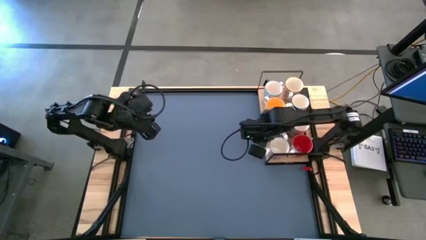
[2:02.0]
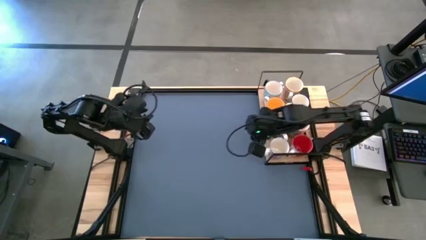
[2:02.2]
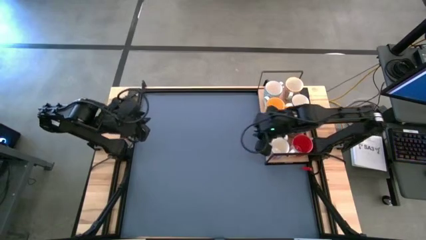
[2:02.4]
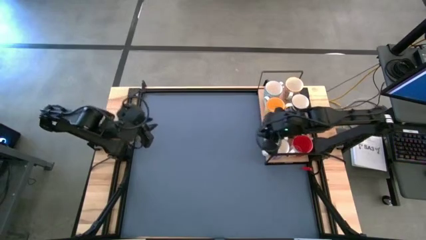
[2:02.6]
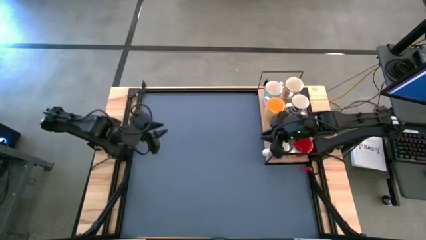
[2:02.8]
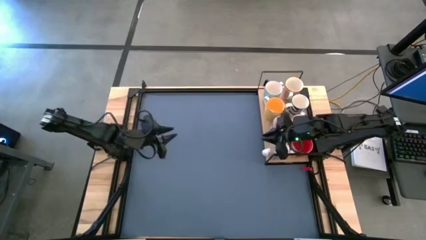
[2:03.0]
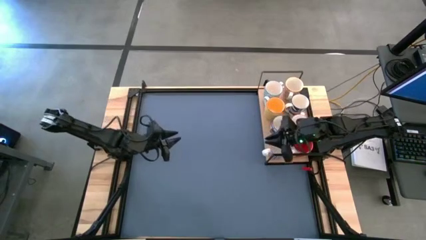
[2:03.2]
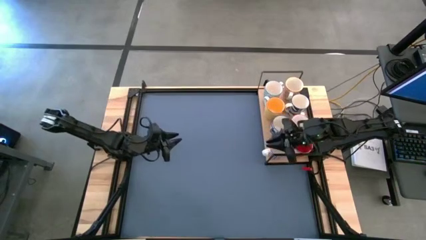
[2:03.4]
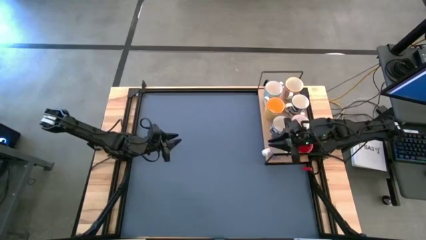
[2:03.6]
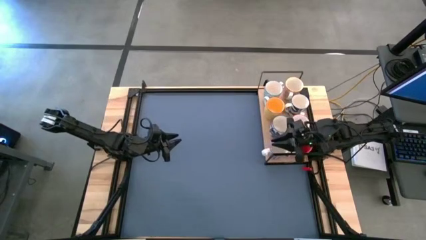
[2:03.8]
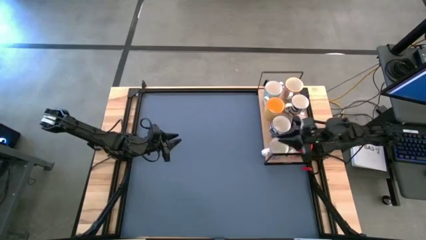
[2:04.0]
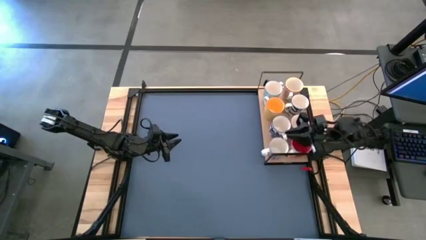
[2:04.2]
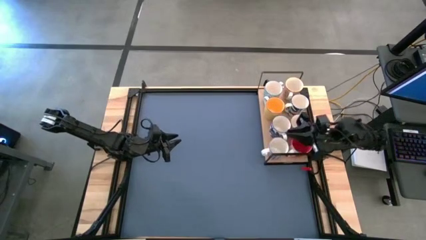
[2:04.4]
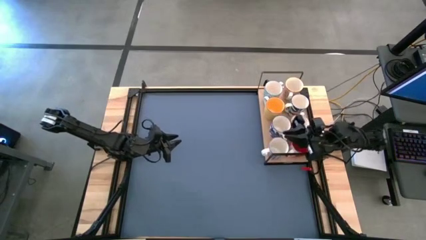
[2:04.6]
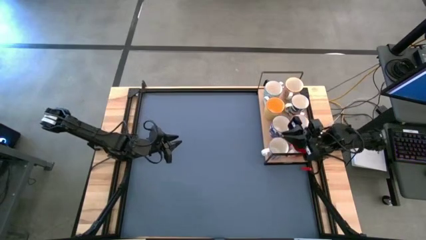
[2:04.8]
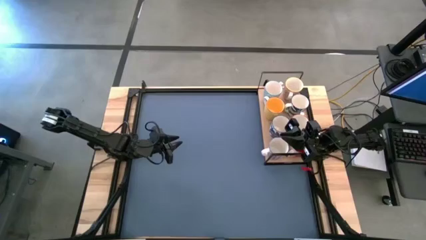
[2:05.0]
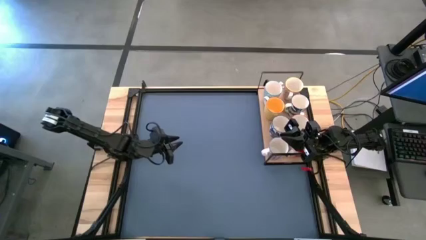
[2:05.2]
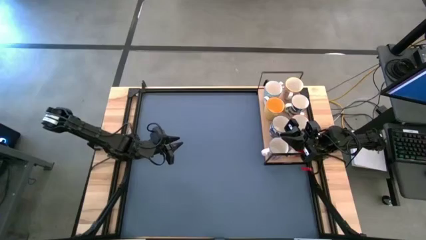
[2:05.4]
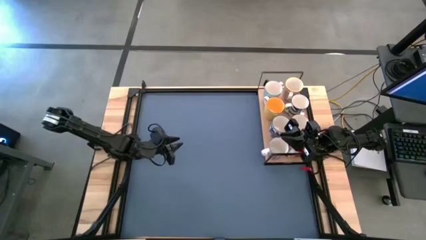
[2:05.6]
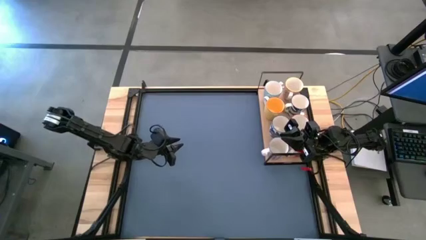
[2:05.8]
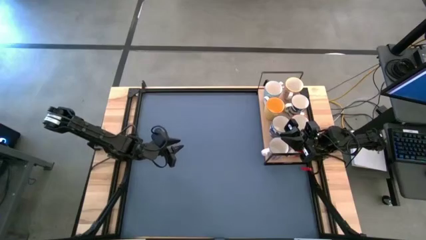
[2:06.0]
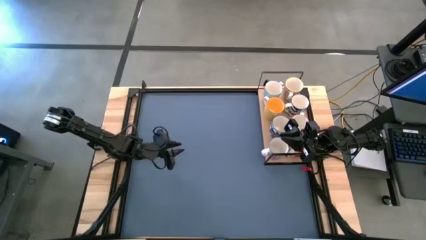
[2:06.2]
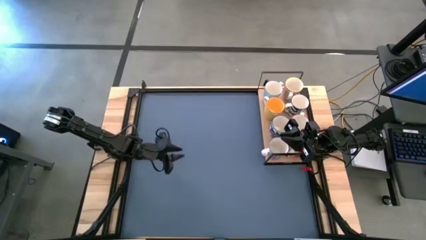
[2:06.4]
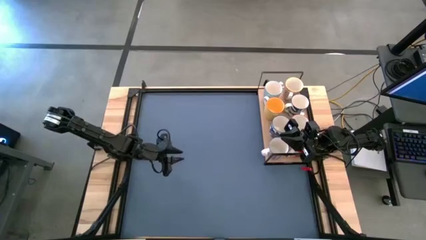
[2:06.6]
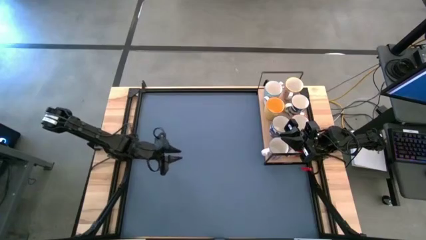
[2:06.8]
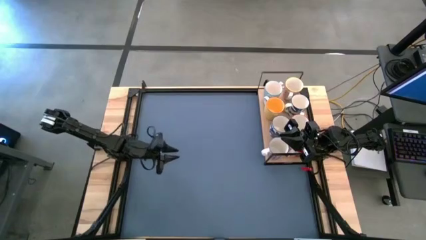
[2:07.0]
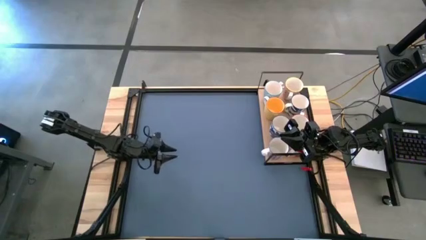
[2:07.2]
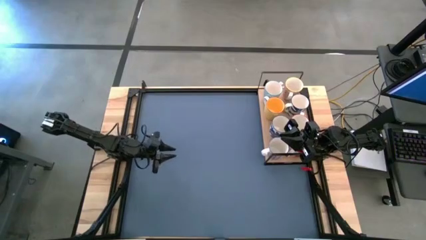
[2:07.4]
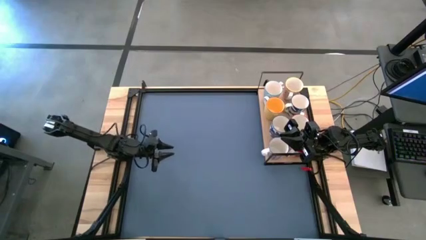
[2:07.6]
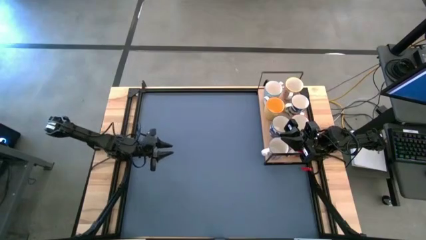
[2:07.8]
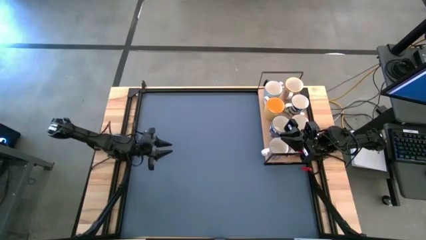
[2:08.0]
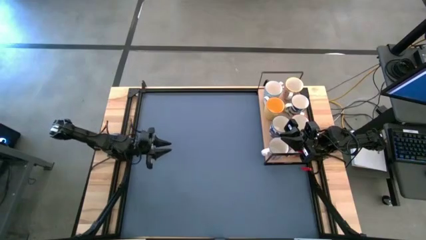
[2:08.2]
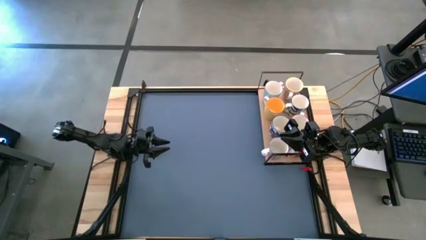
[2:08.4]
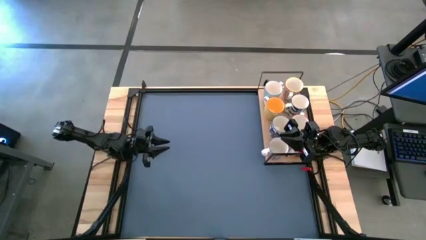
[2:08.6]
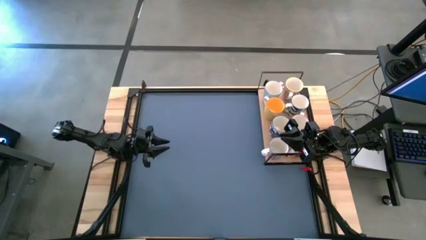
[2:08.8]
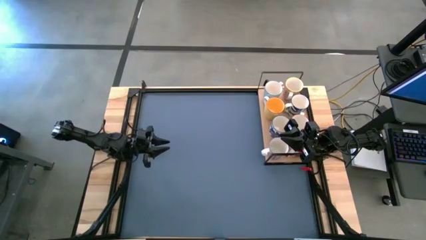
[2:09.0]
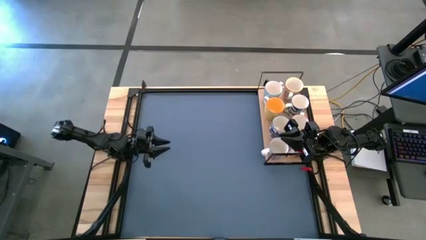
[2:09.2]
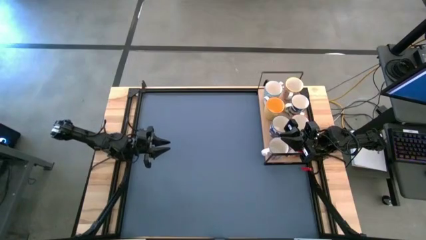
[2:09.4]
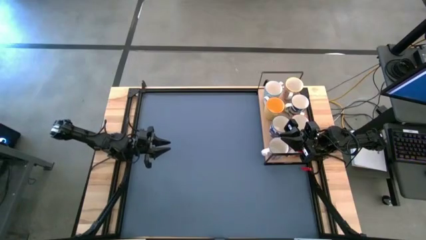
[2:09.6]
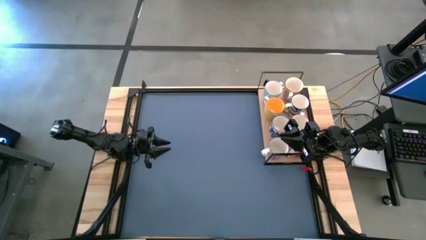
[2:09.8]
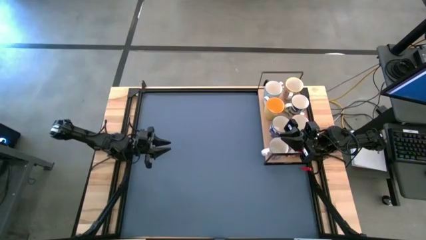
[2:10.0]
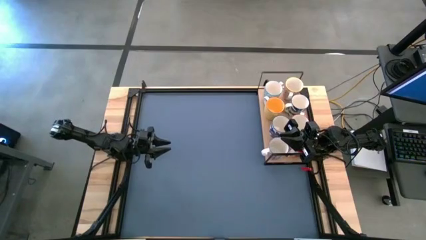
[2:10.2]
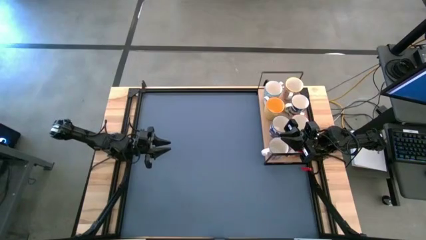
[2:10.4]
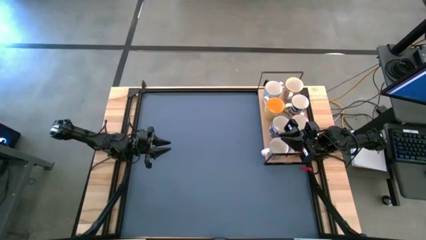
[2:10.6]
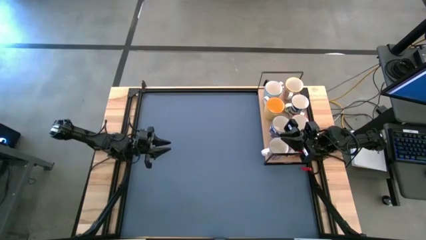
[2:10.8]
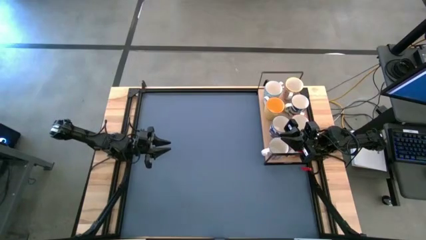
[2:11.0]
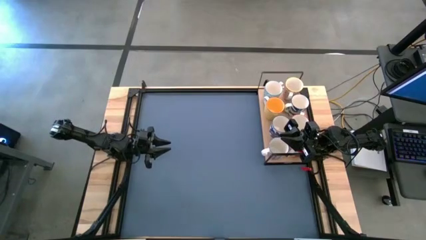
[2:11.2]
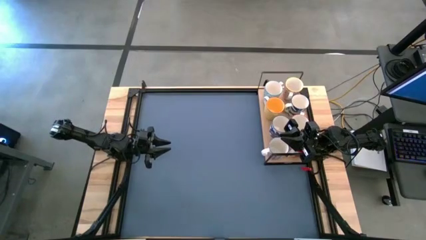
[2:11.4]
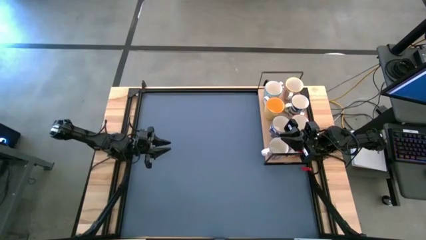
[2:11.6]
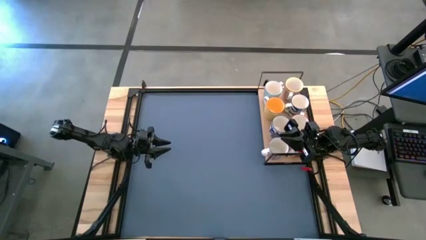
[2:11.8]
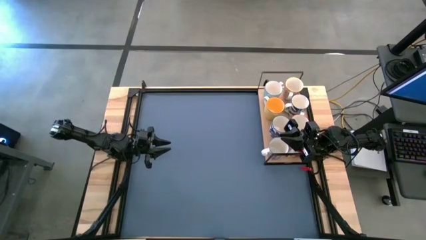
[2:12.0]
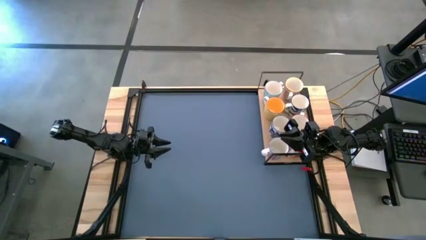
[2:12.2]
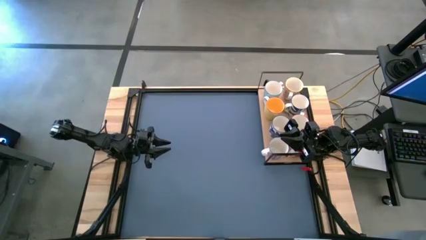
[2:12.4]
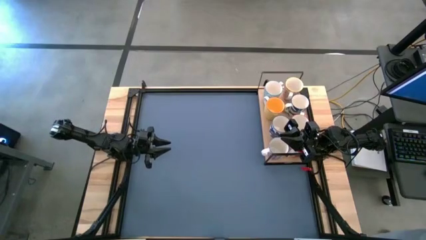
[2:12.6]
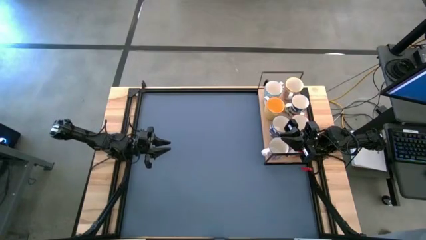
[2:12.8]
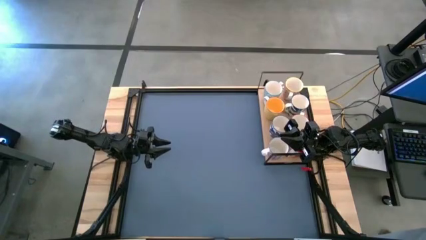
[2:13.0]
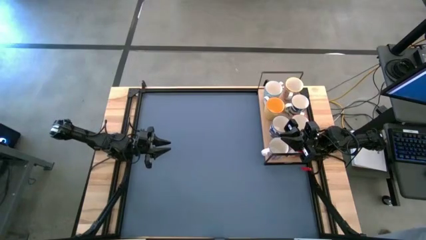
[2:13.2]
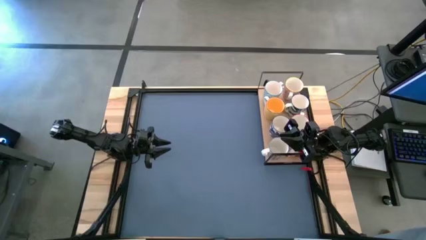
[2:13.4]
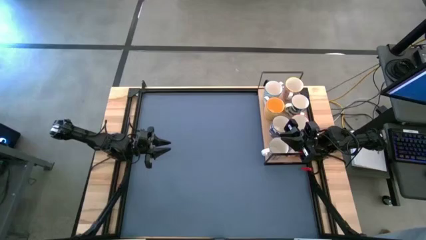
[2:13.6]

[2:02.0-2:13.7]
Task: Place coffee mugs
Return to Home Position

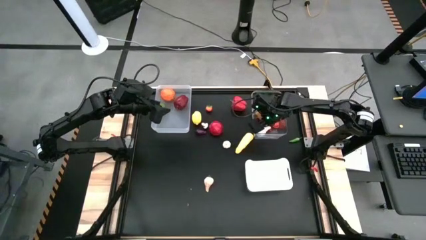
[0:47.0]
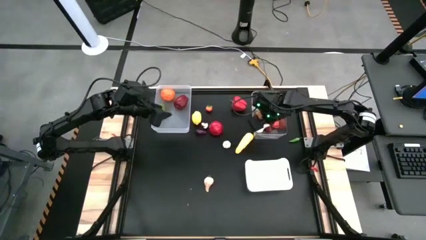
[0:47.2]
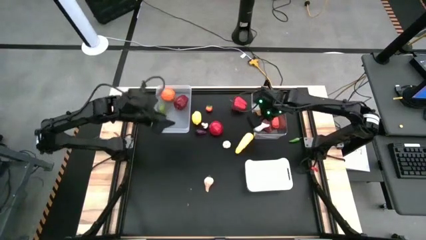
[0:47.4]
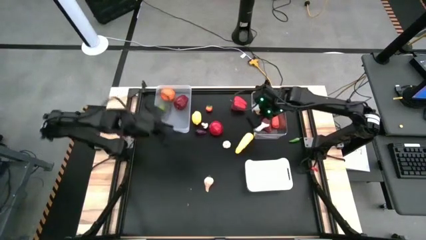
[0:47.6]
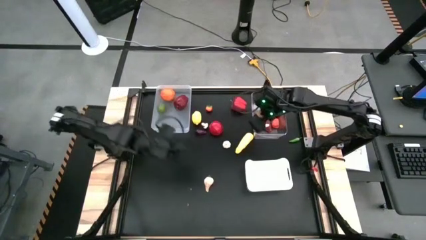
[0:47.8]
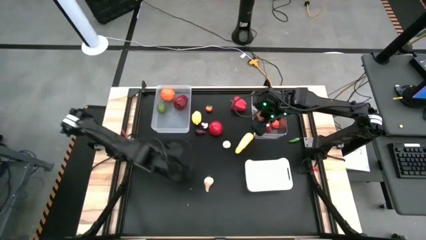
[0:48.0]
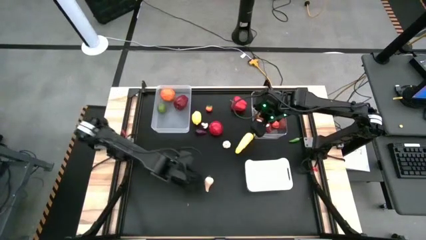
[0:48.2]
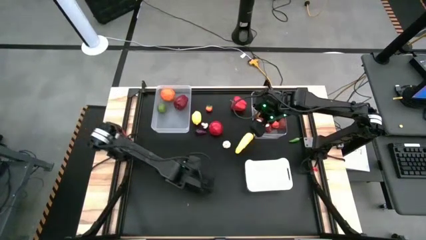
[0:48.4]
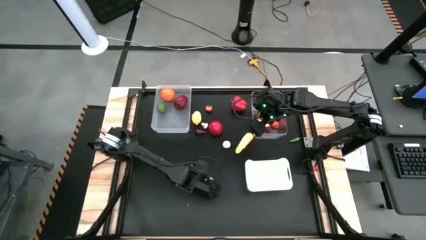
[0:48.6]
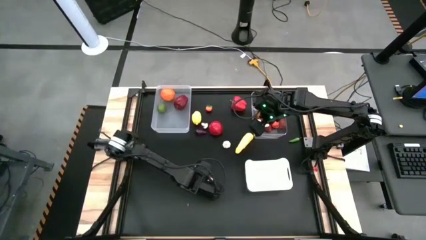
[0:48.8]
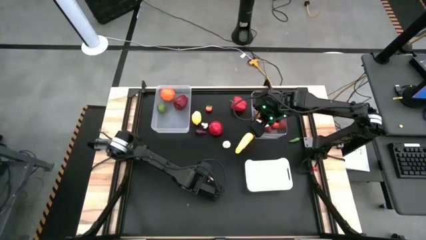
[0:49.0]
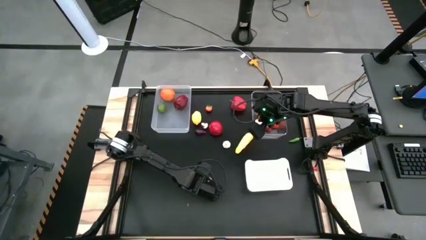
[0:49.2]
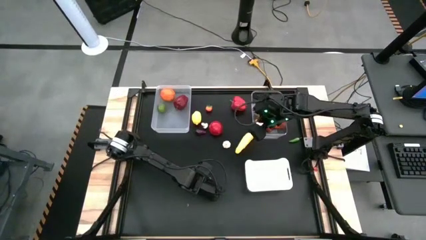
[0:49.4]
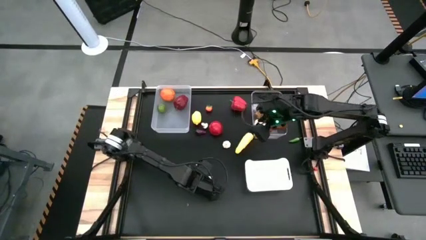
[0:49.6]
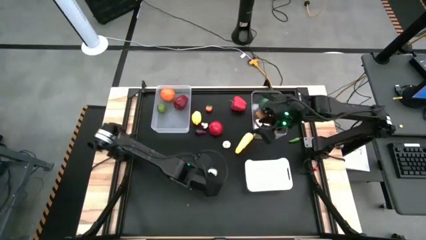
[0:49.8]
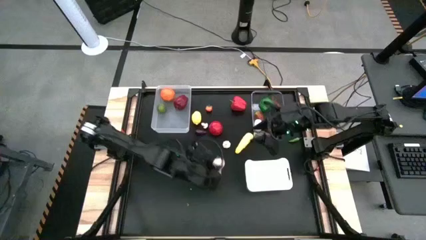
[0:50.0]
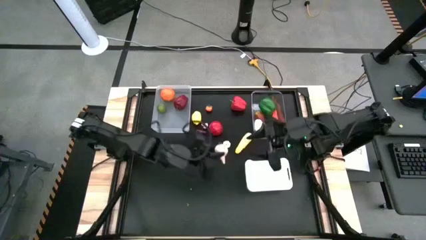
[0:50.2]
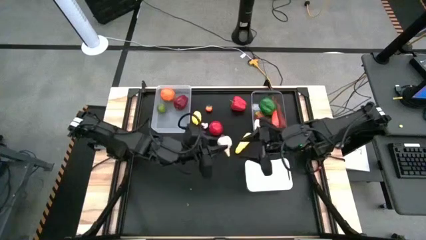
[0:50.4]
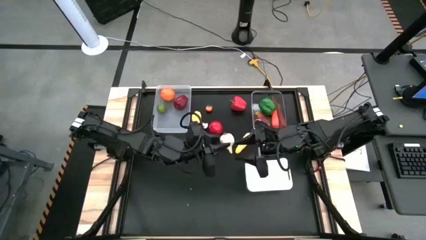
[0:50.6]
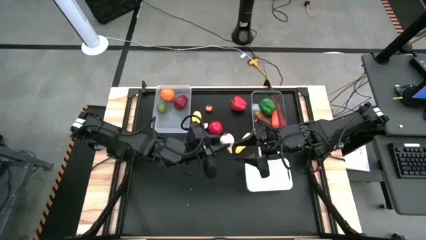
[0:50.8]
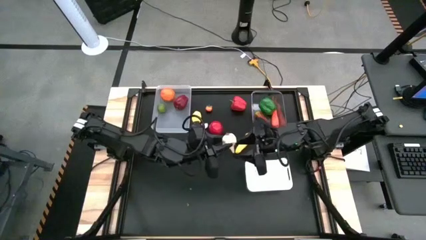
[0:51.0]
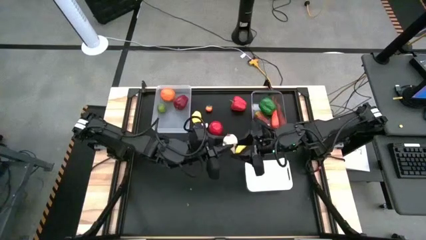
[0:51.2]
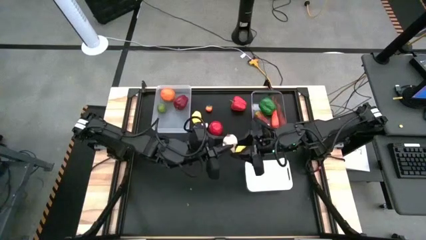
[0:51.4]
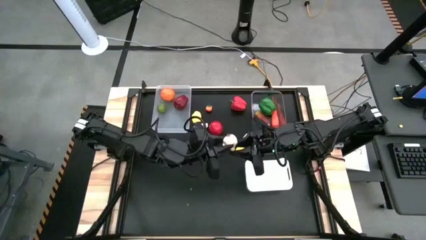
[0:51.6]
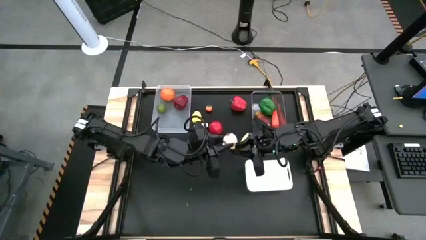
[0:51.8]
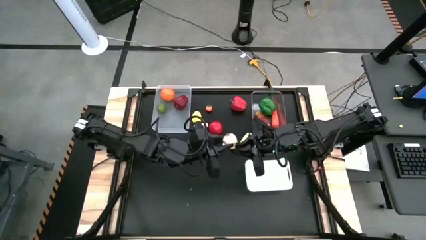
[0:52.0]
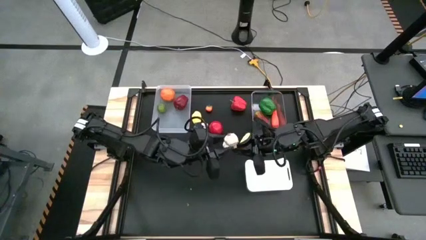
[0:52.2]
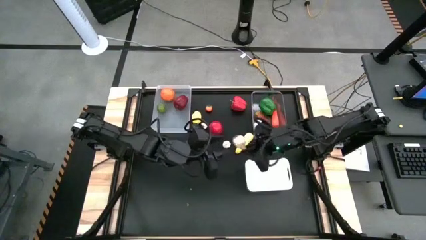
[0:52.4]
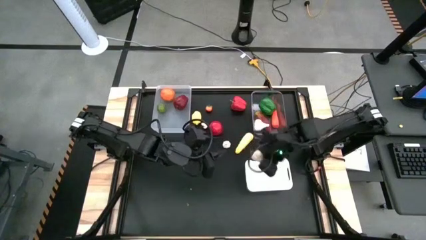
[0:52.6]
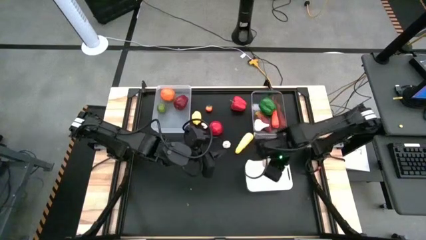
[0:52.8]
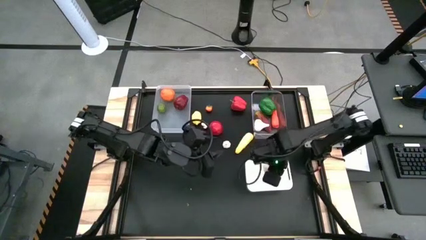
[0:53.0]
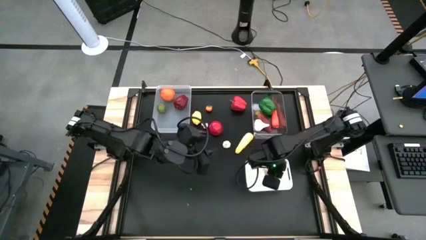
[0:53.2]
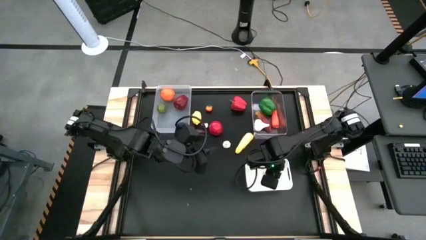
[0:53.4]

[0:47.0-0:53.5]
Task: Sort produce into baskets
Put the bottom small white garlic into the white bin
